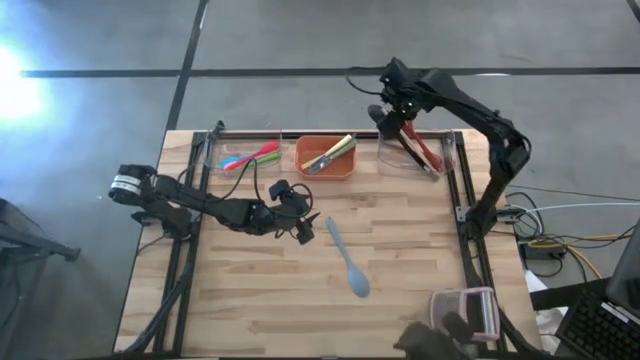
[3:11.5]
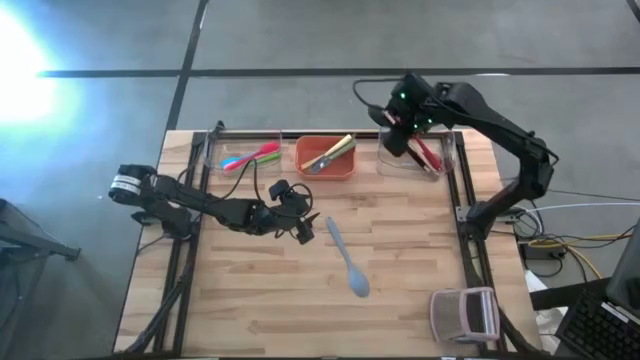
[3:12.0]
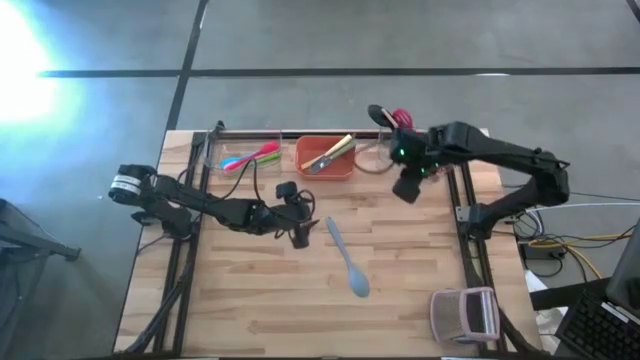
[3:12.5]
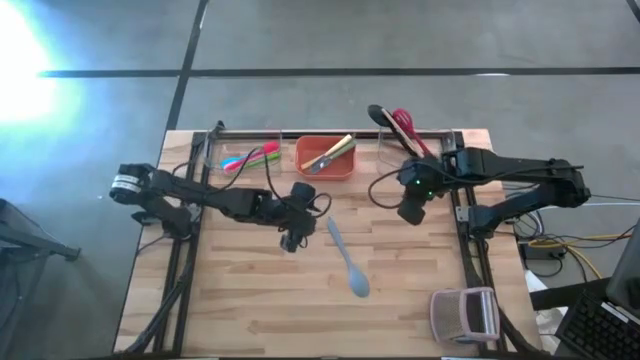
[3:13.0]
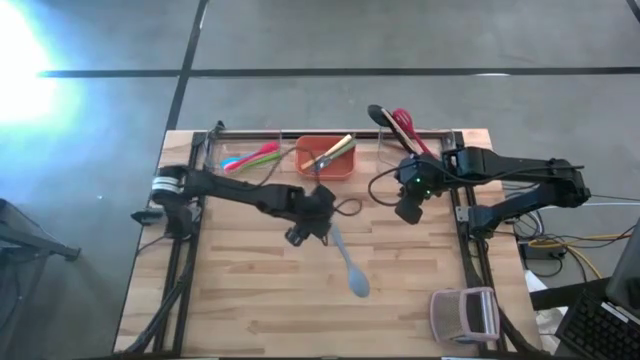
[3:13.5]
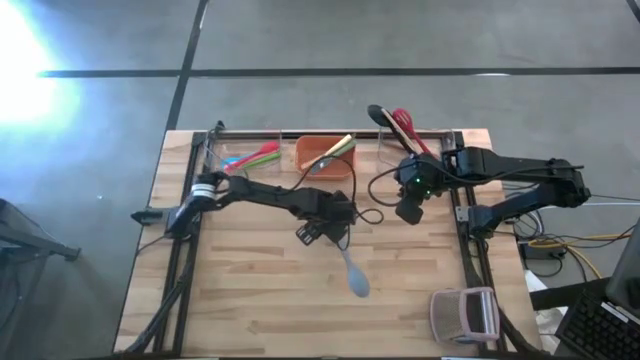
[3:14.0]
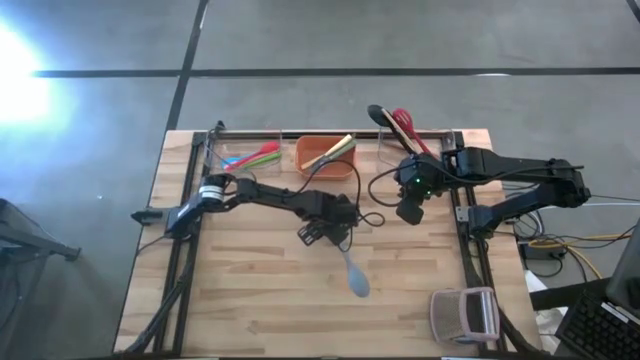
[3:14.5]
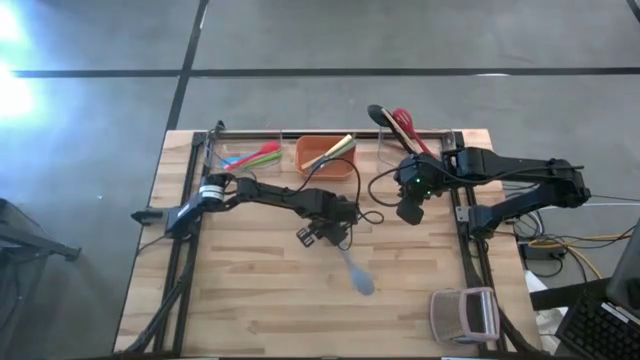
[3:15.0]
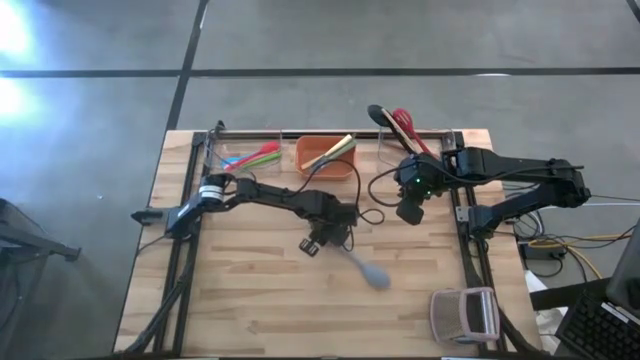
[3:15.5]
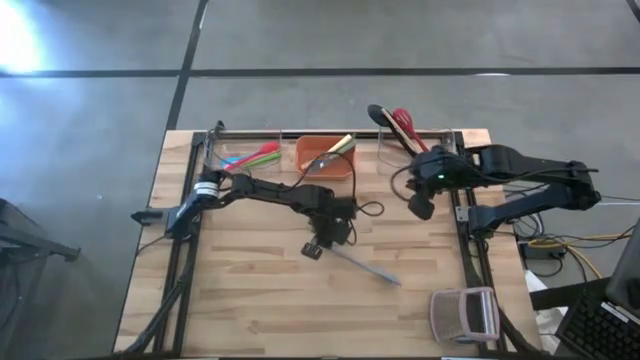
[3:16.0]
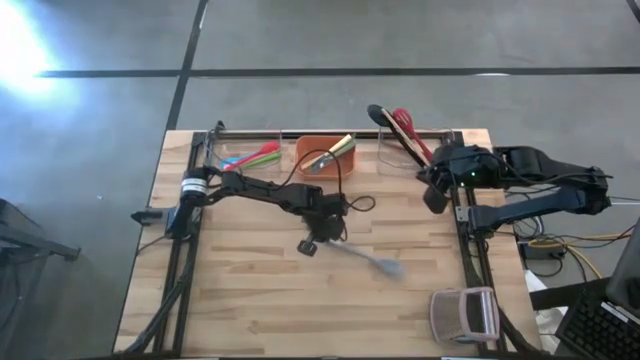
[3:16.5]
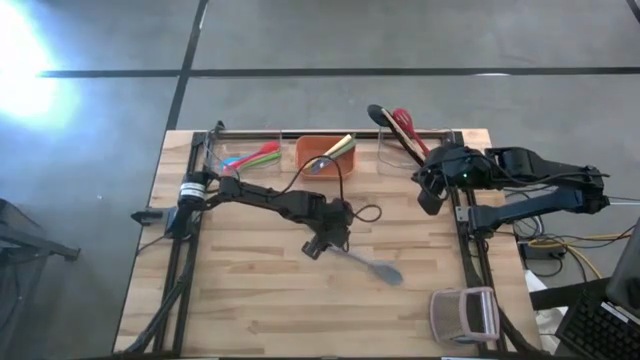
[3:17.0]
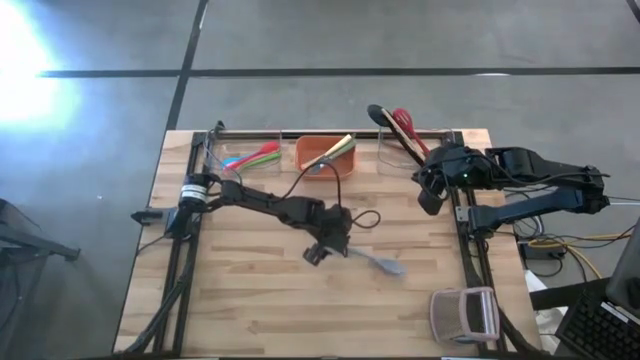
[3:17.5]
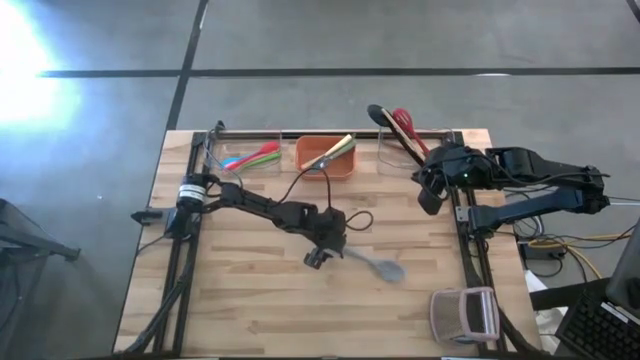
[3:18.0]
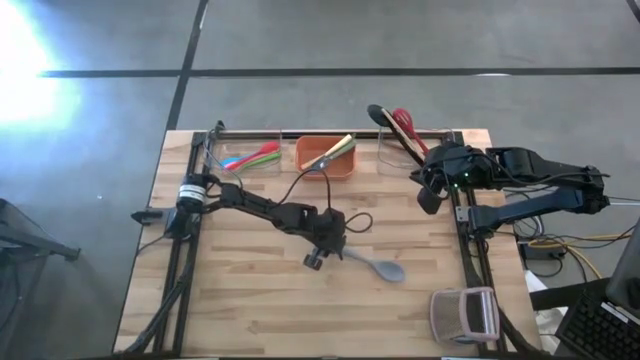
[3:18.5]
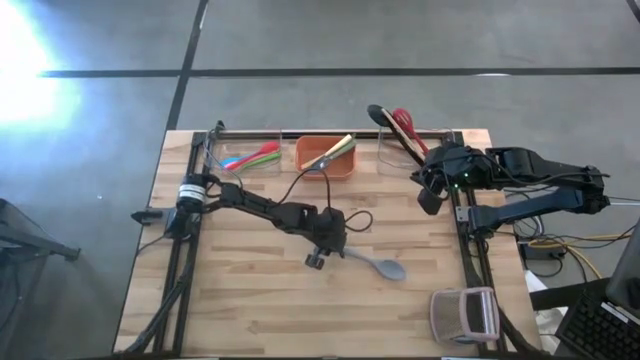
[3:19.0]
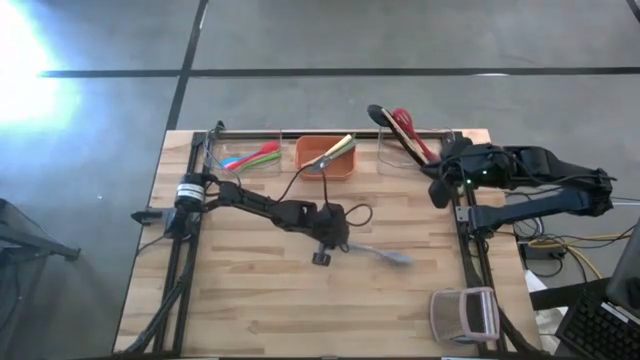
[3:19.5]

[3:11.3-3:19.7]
Task: Pick & Place Kitchen Items
Put the gray serving spoon into the right transparent bin

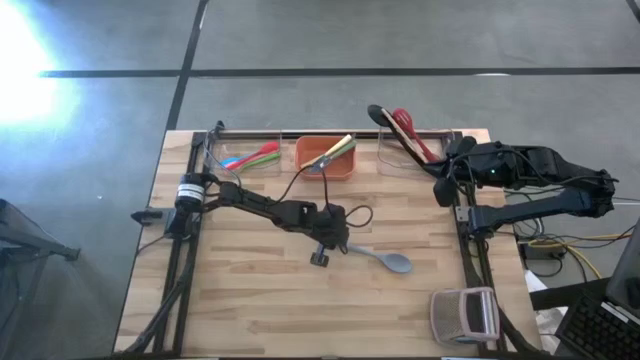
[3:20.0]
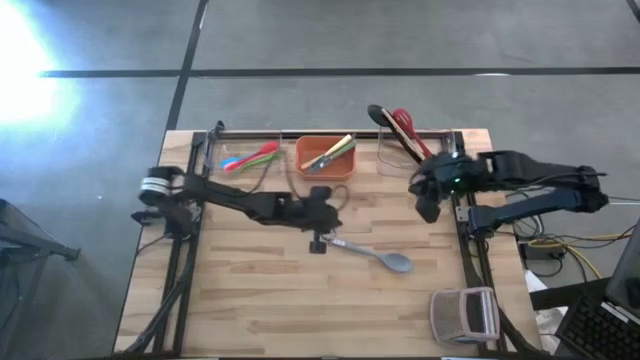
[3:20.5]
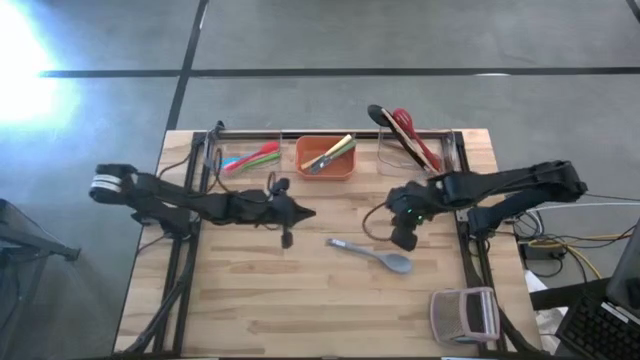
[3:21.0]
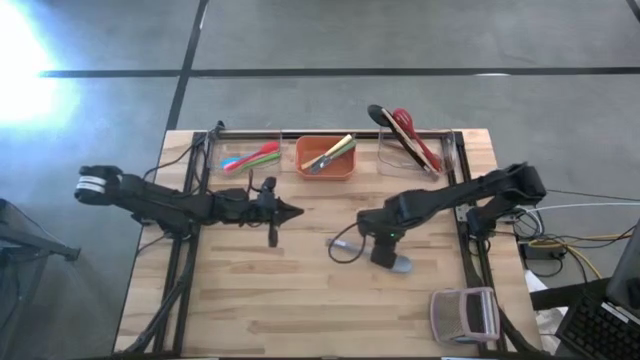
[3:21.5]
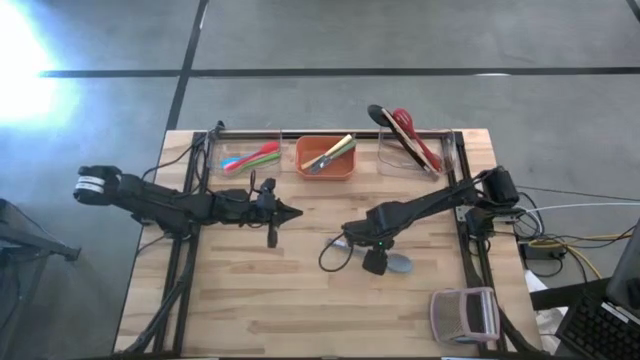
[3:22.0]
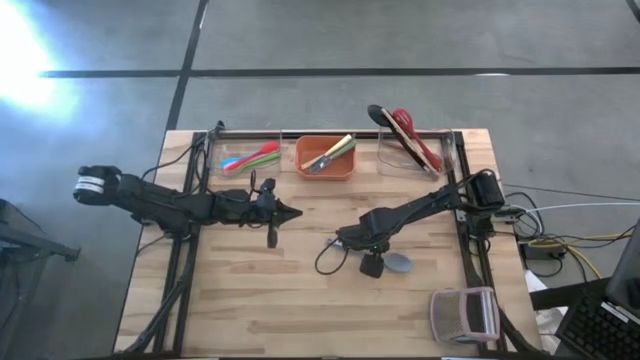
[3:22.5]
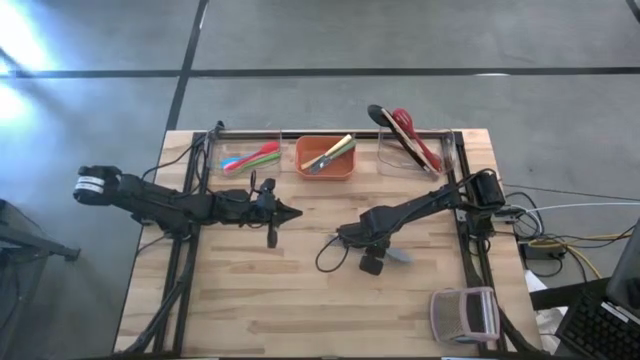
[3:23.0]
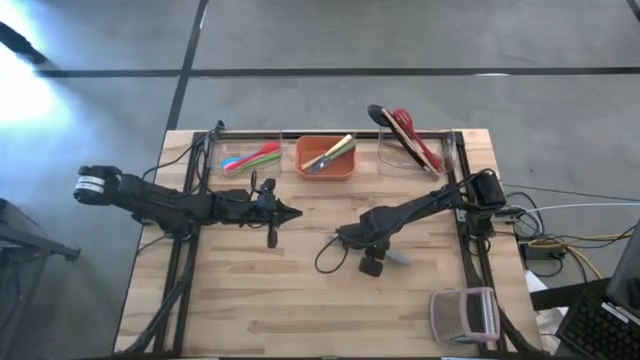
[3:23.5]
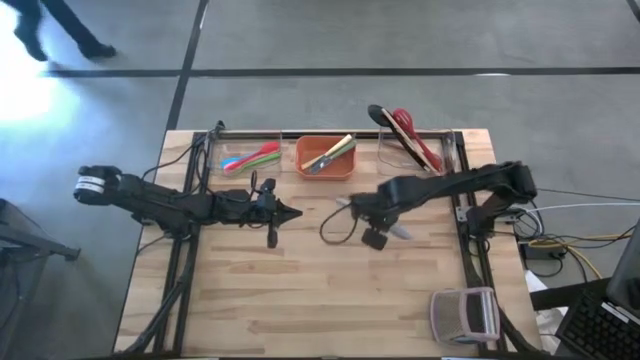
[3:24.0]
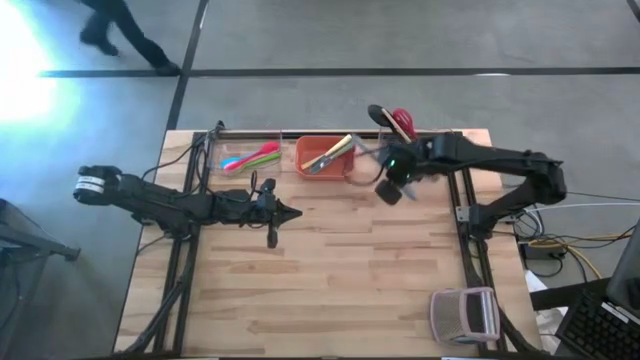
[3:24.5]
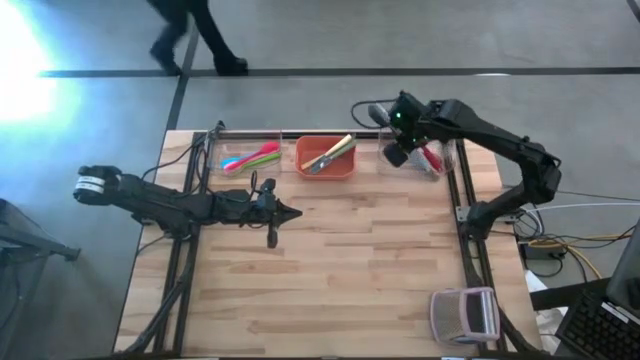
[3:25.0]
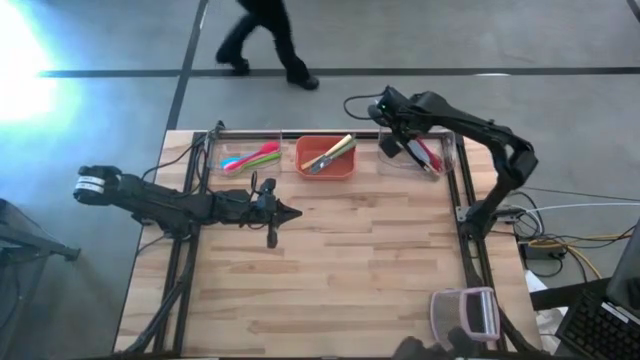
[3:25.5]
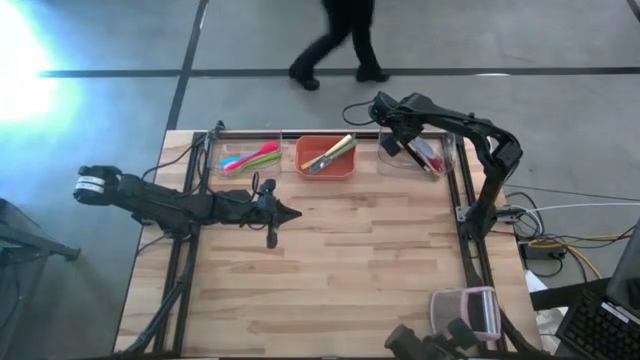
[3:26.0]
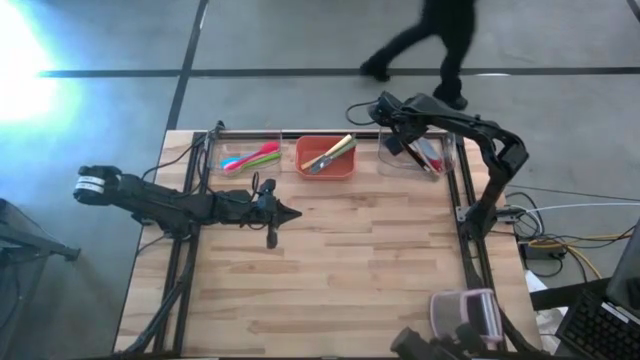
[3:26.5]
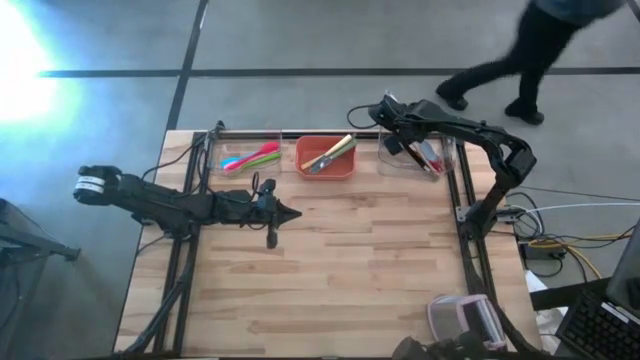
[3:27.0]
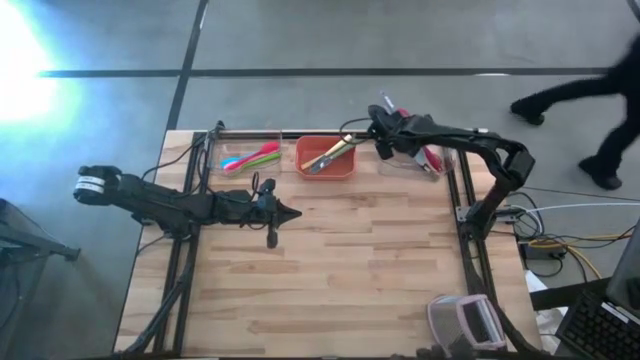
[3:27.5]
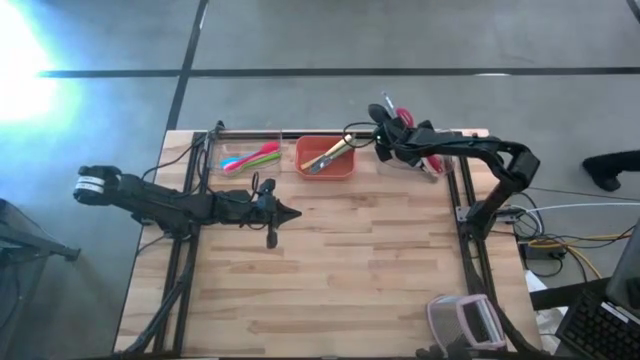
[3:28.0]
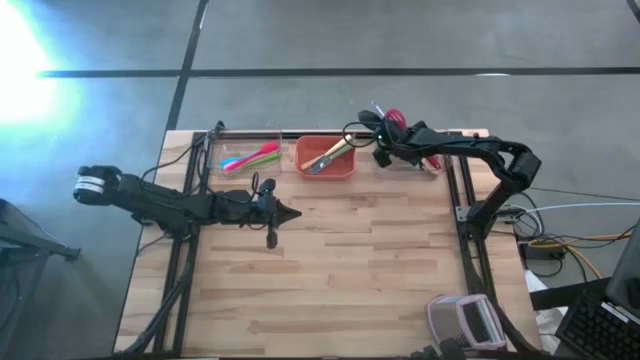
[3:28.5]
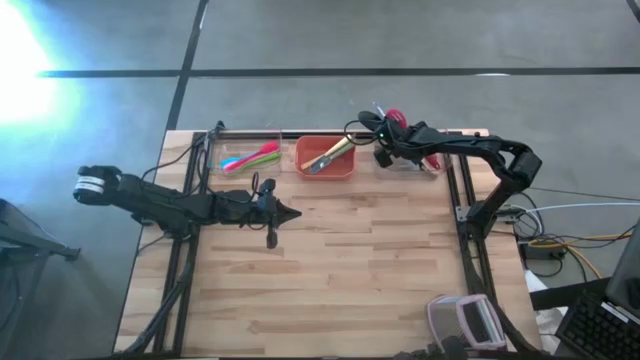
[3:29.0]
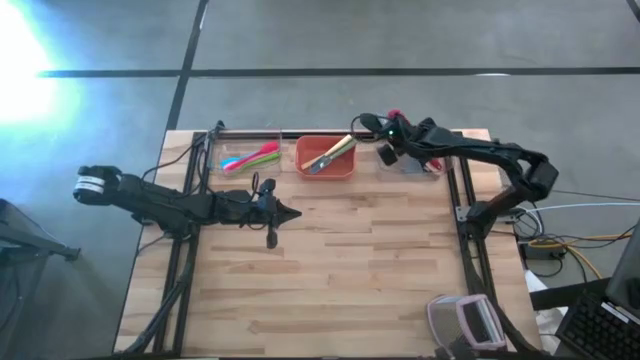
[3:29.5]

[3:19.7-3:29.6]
Put the gray serving spoon into the right transparent bin

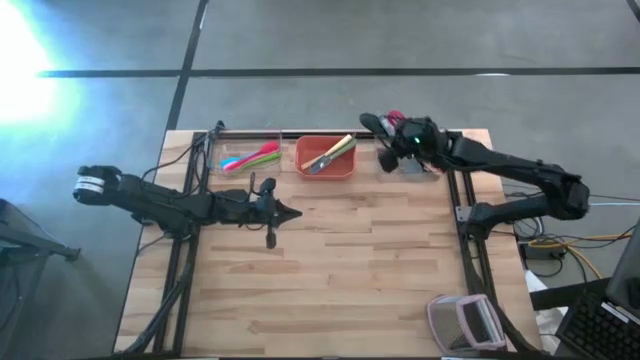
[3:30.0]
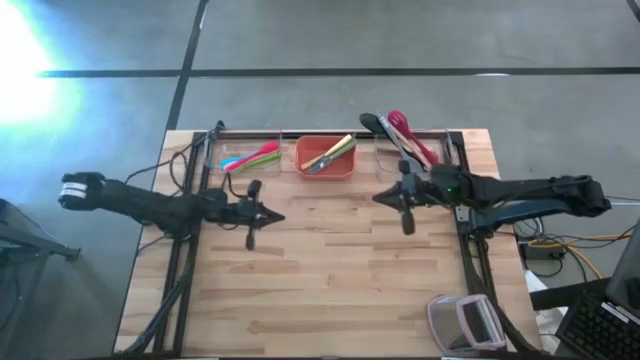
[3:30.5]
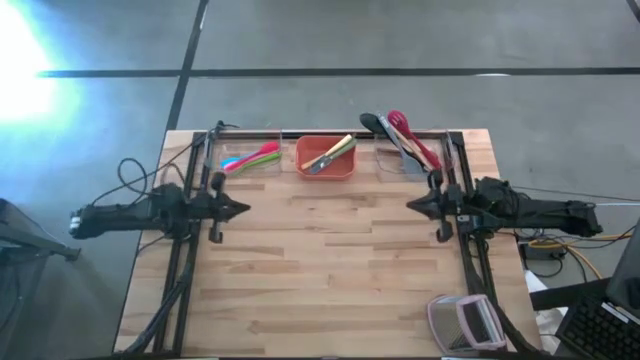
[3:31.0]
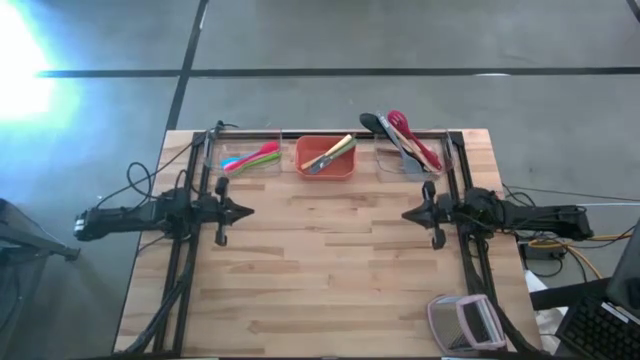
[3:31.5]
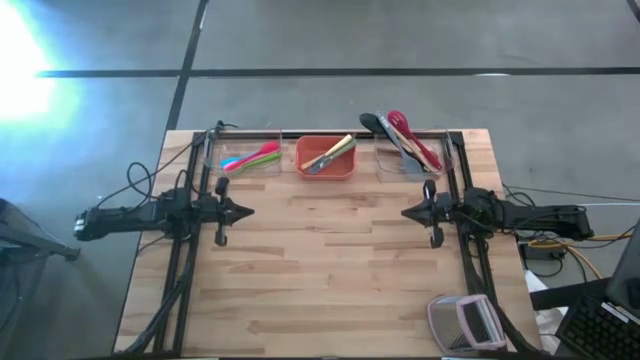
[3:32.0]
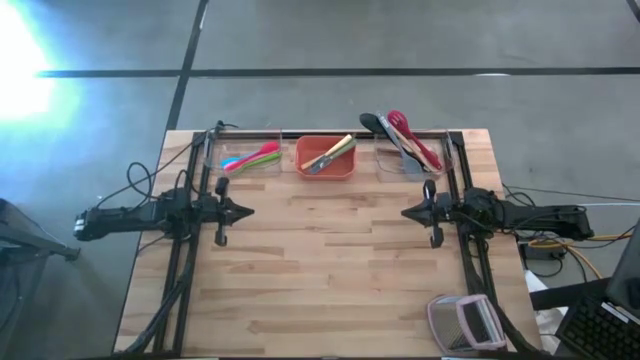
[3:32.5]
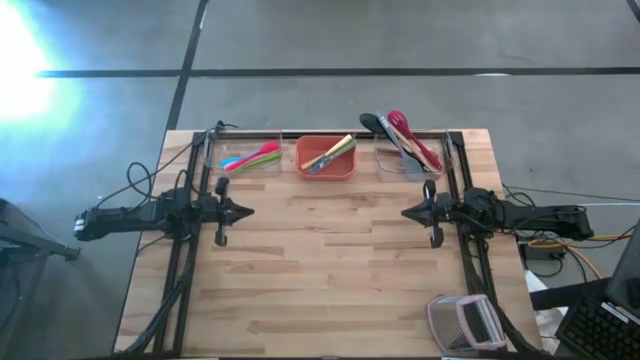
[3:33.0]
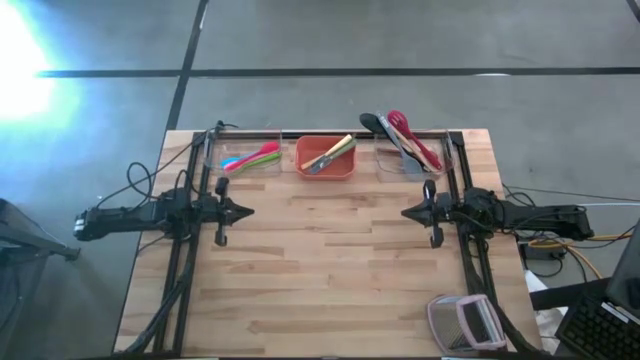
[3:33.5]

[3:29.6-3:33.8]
Return to Home Position
